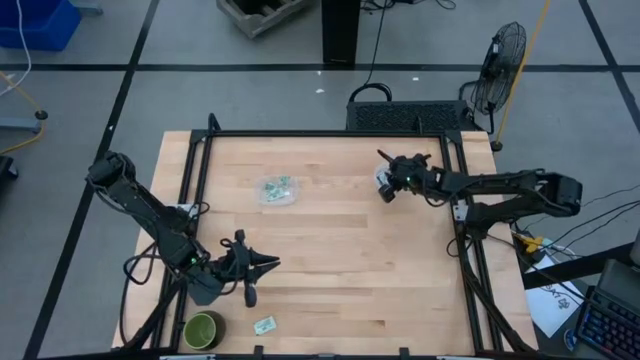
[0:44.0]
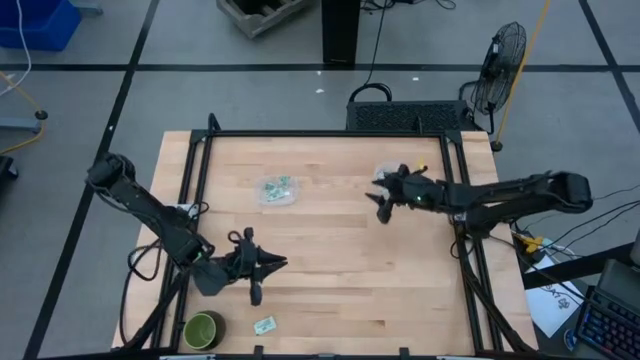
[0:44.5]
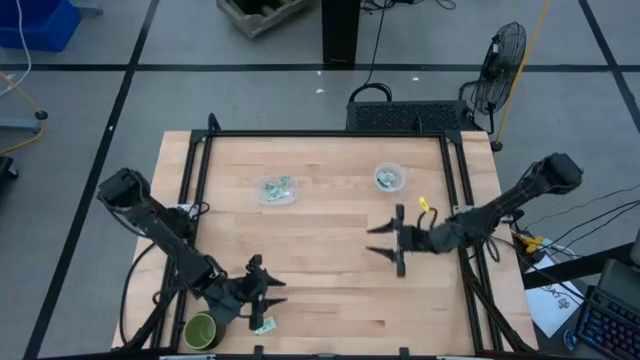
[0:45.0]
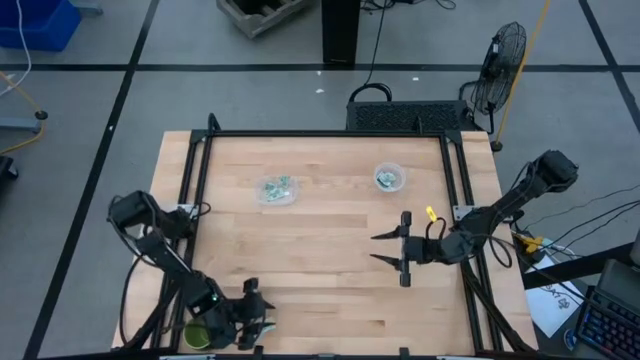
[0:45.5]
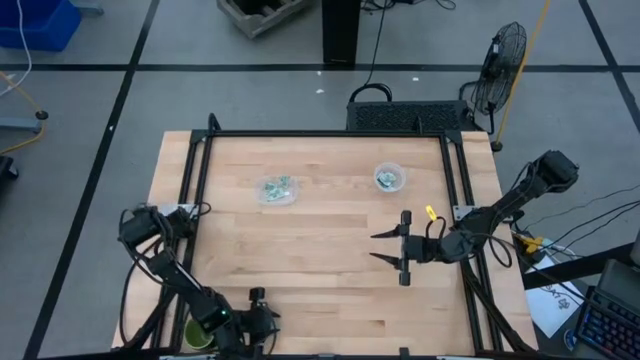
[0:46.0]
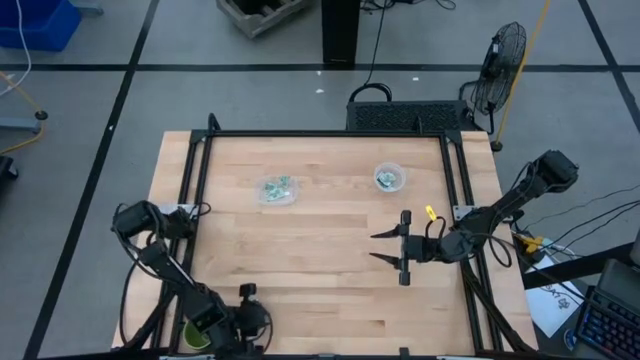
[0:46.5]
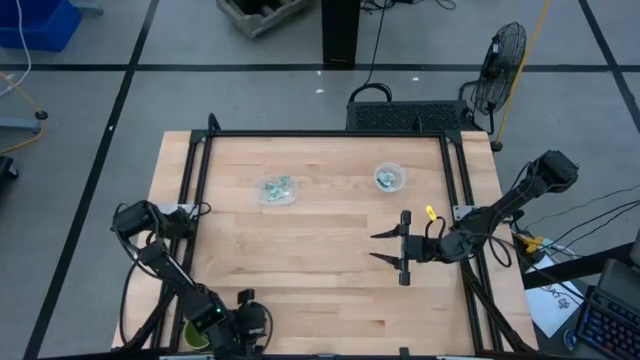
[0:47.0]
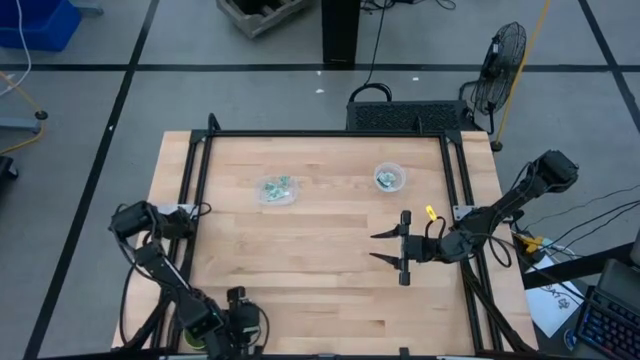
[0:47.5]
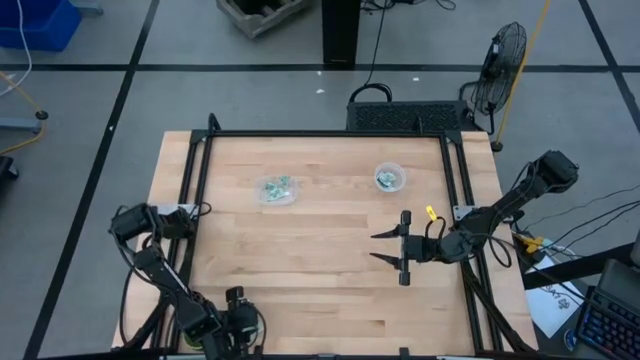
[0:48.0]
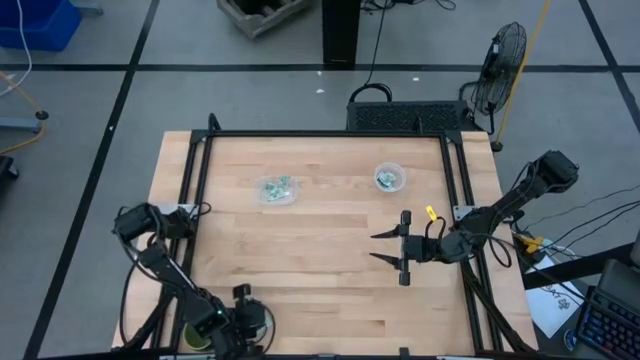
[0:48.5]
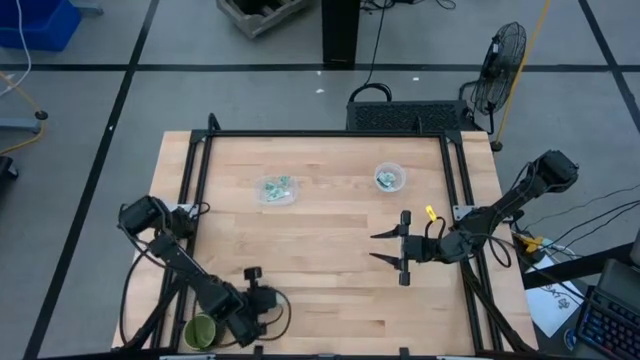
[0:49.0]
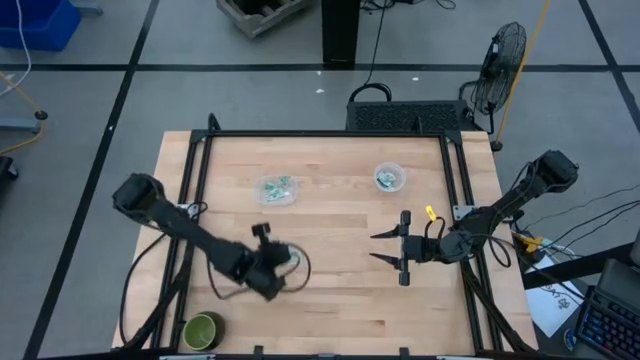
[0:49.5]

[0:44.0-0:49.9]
Task: Pick and place items into bin
Put the stevia packet into the left transparent bin

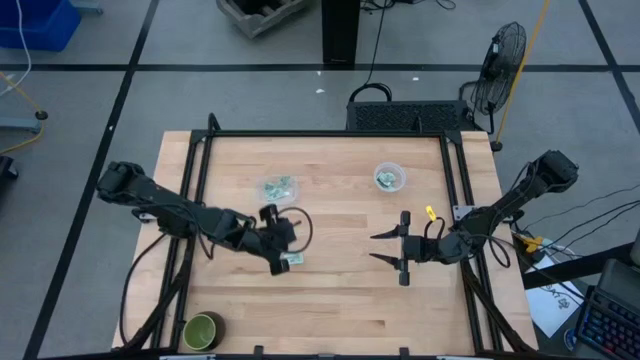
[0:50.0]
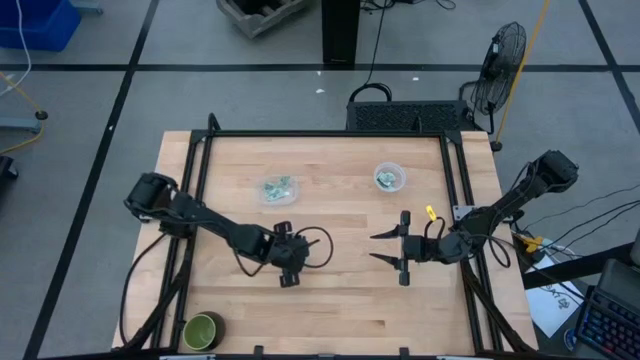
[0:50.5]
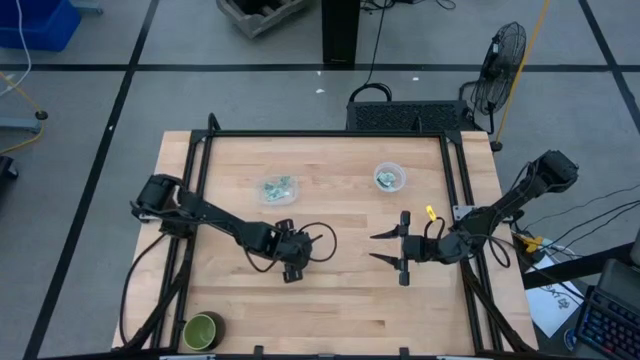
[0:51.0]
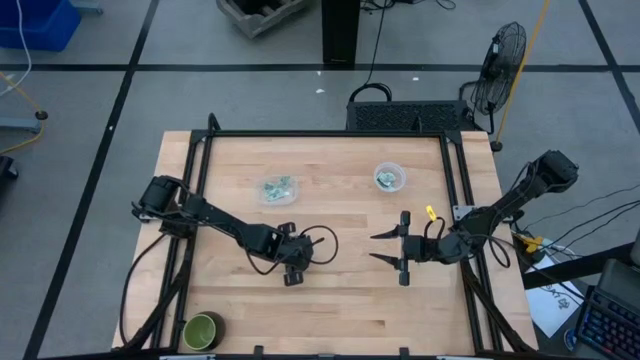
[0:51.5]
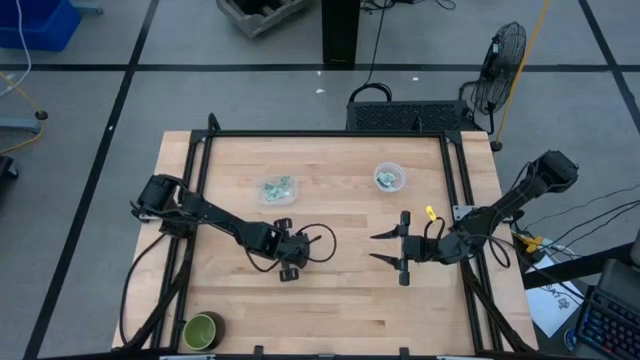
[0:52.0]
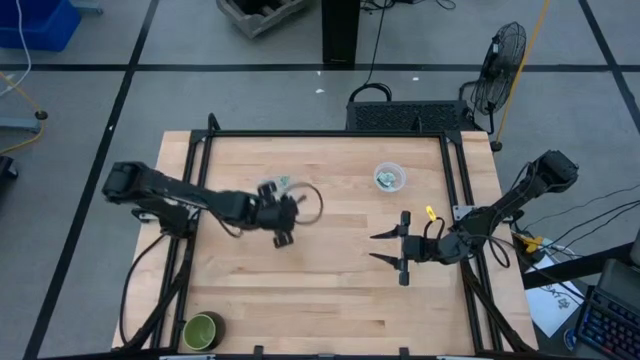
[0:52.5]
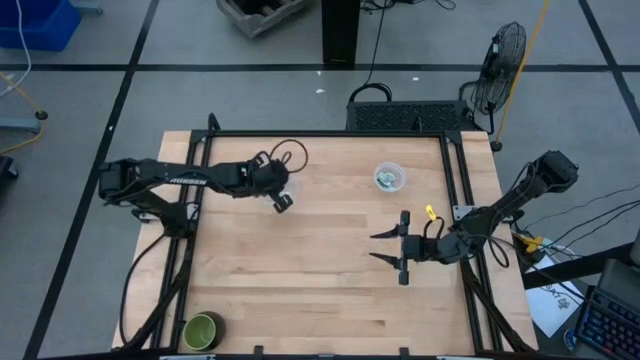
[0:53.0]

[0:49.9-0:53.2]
Put the stevia packet into the left transparent bin

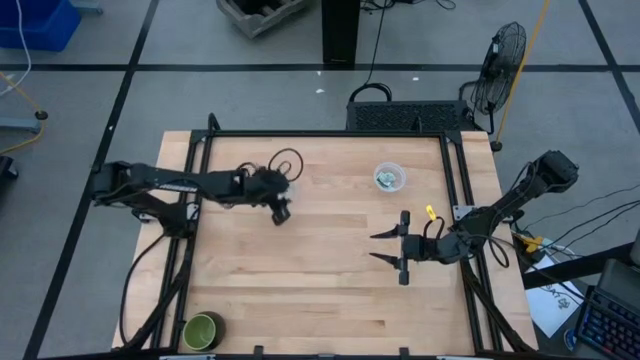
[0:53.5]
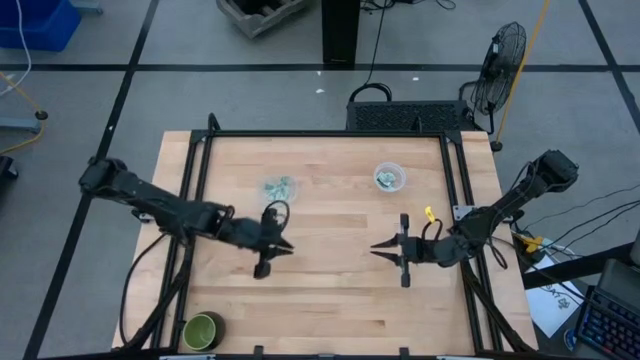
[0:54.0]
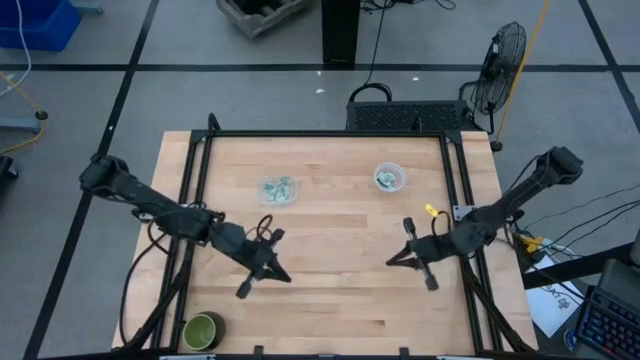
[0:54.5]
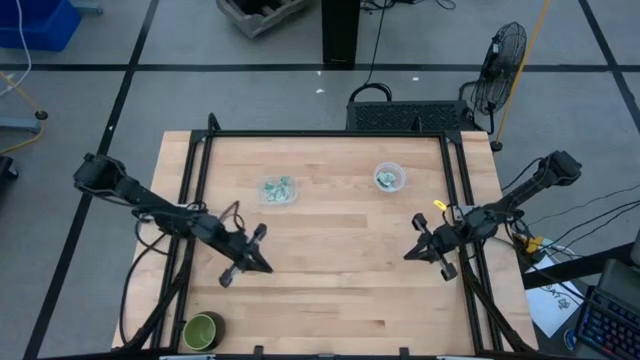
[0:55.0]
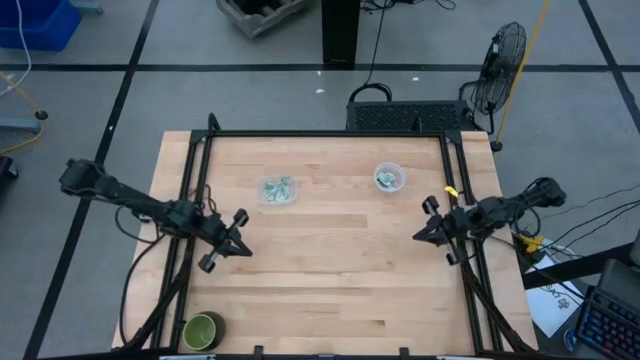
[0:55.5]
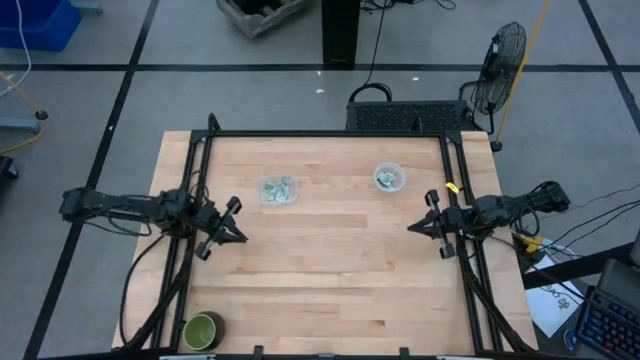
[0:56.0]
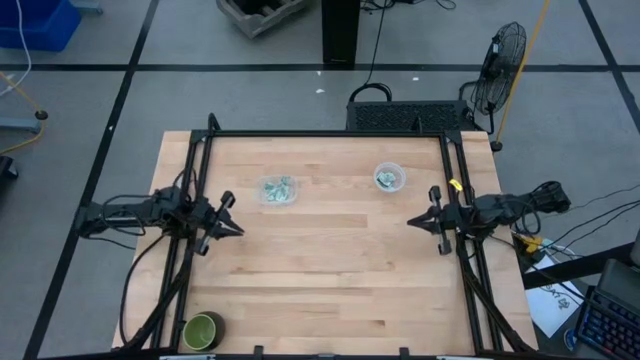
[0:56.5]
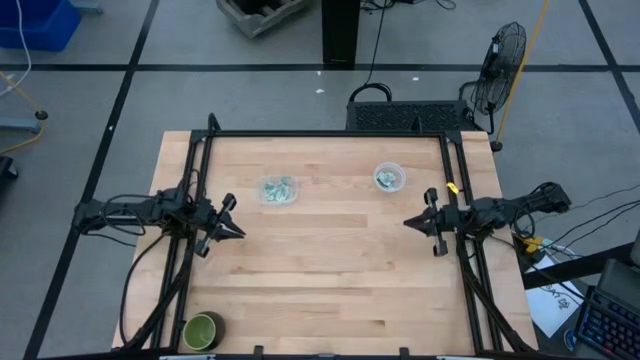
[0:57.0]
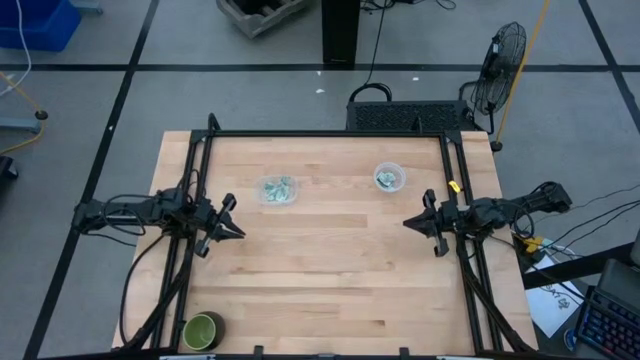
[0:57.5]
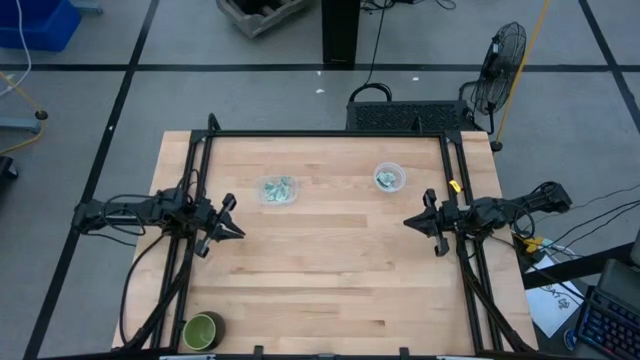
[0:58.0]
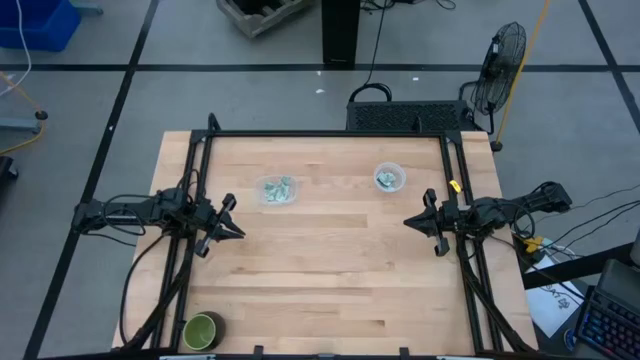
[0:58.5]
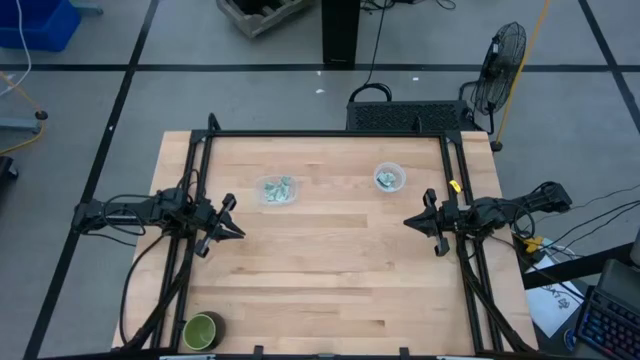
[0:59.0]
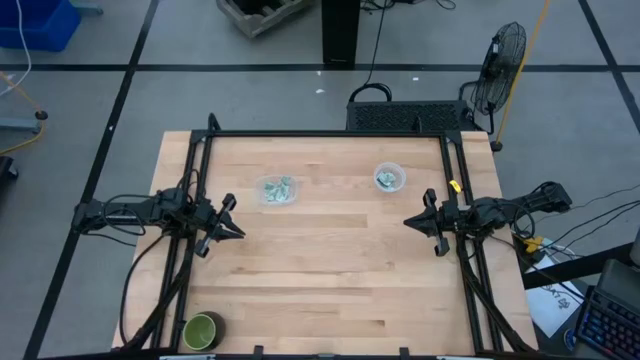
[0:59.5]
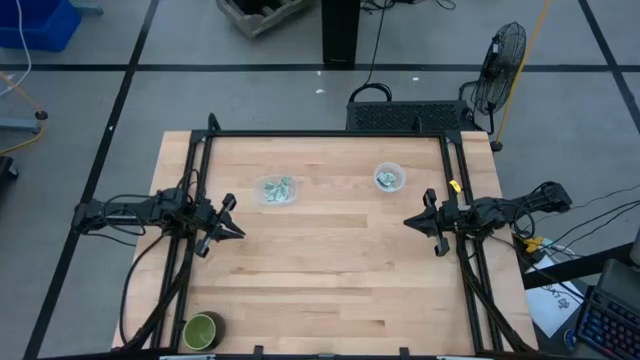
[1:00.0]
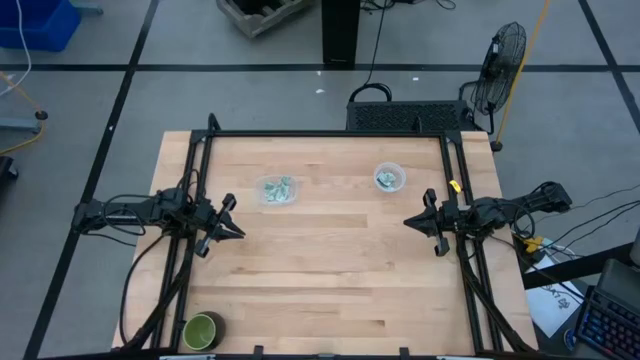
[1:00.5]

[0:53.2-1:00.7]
Return to Home Position

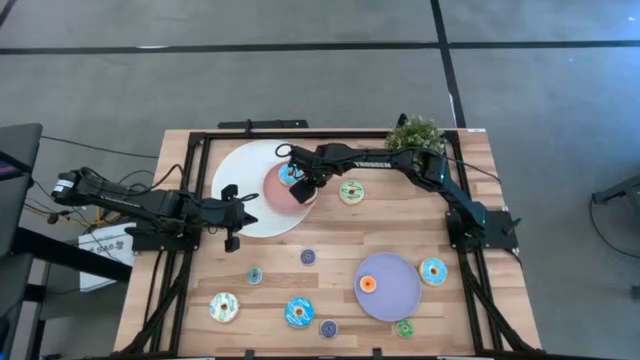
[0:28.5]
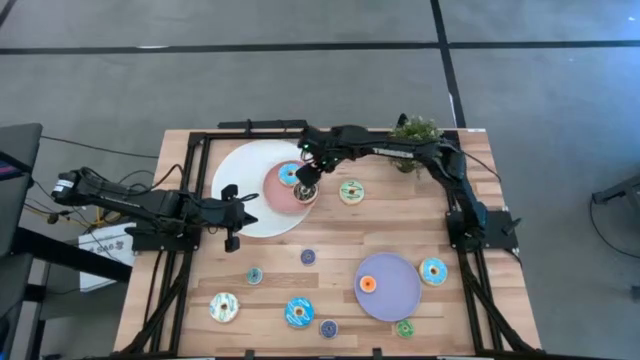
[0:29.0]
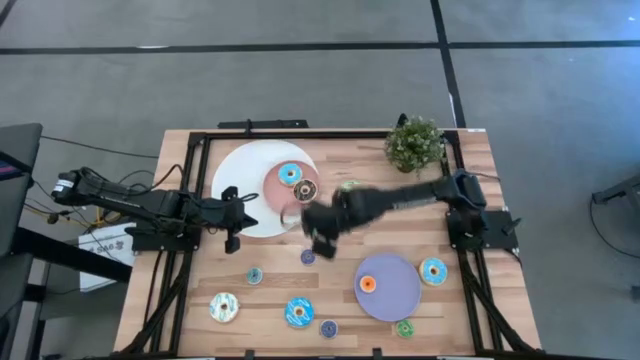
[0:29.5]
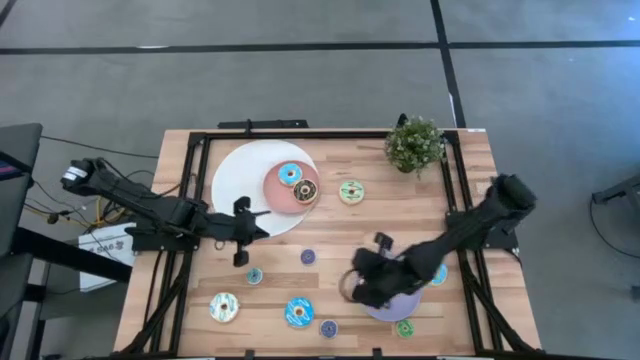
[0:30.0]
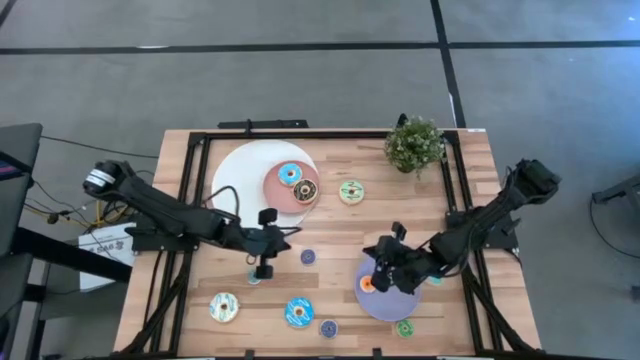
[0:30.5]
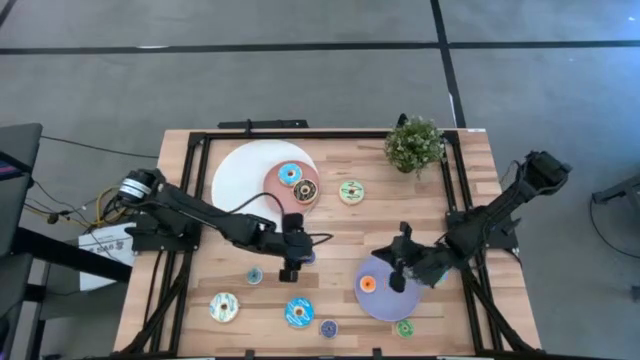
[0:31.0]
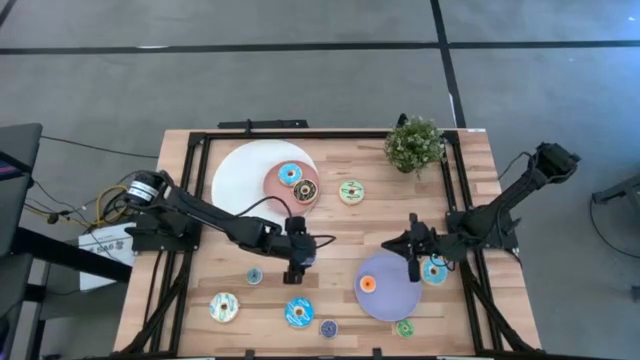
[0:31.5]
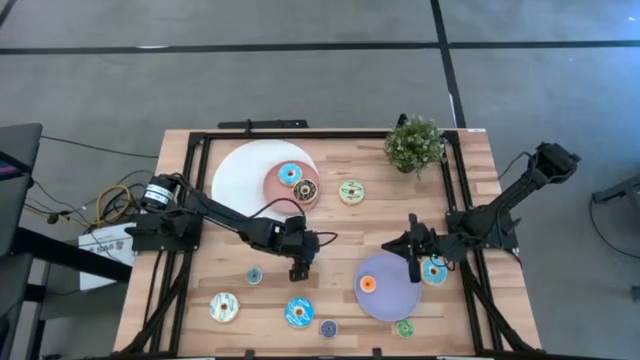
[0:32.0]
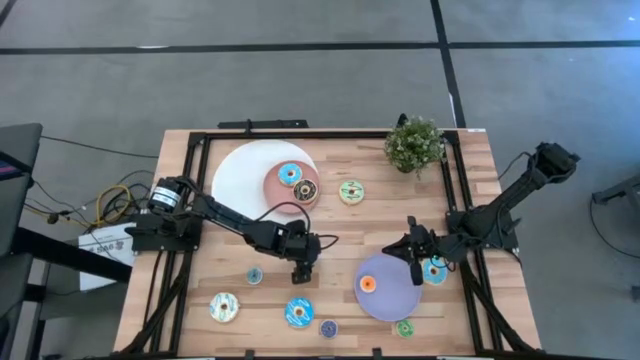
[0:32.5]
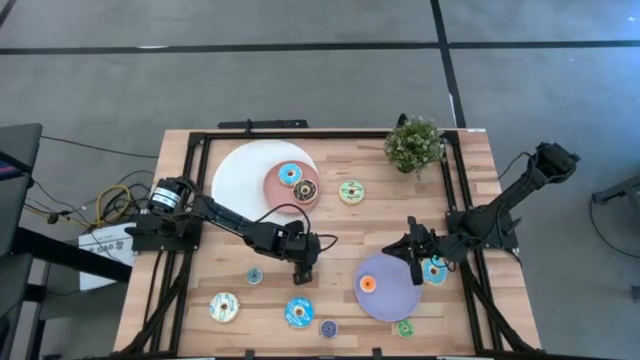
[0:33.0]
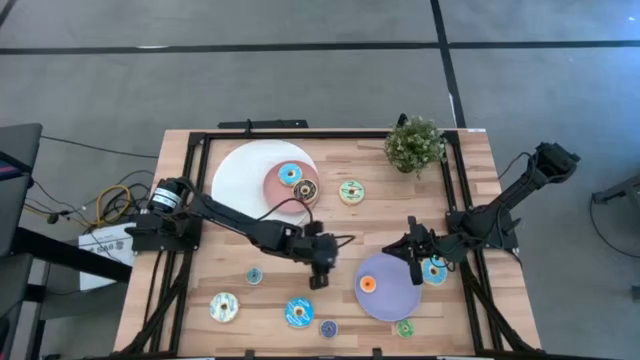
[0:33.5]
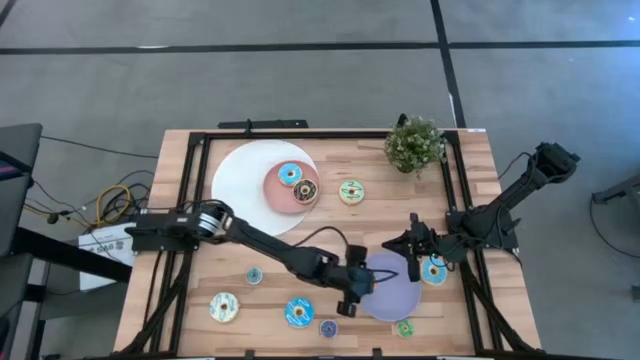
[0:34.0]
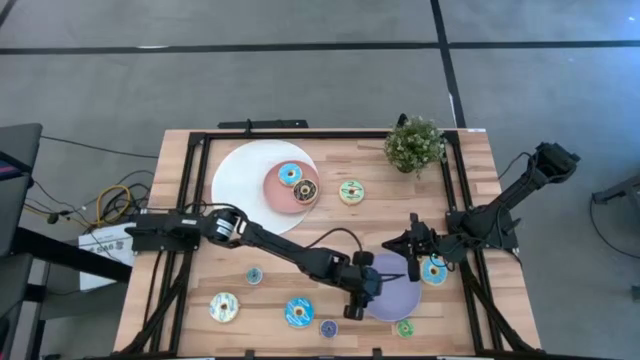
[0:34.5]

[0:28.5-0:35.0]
Task: Pick & Place donuts
Put the top small blue donut on the purple plate
